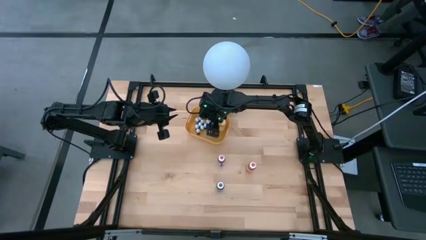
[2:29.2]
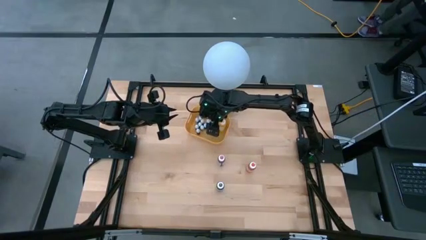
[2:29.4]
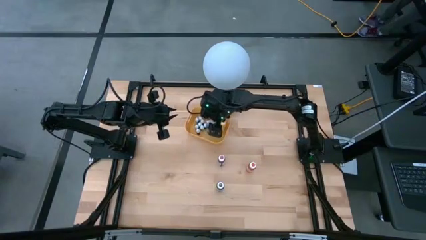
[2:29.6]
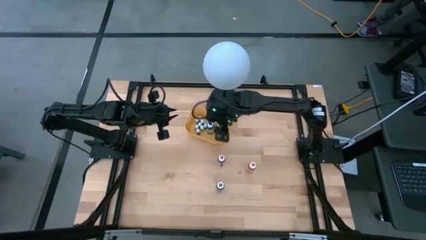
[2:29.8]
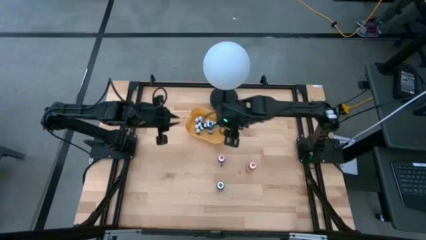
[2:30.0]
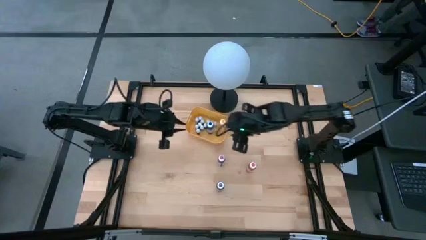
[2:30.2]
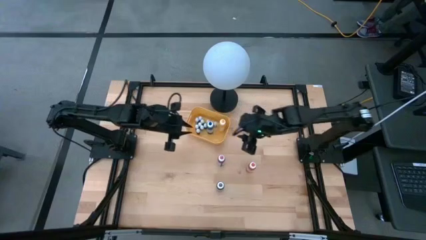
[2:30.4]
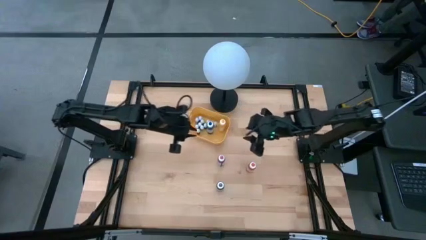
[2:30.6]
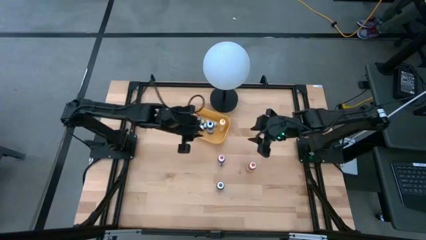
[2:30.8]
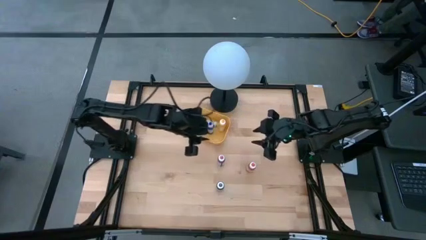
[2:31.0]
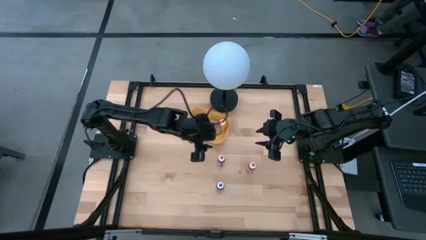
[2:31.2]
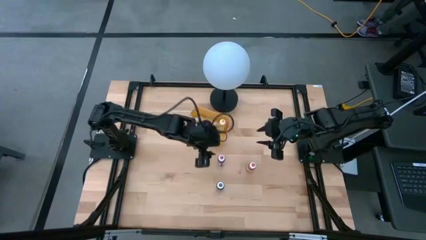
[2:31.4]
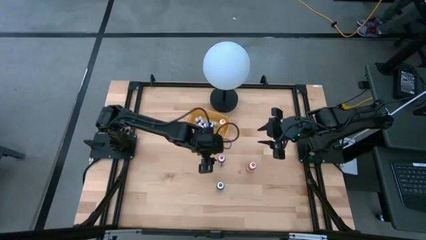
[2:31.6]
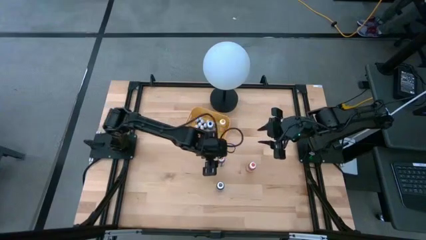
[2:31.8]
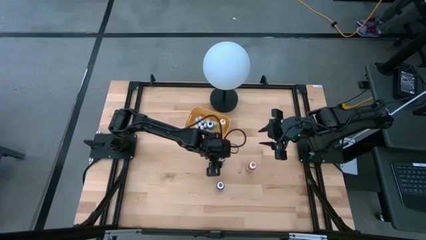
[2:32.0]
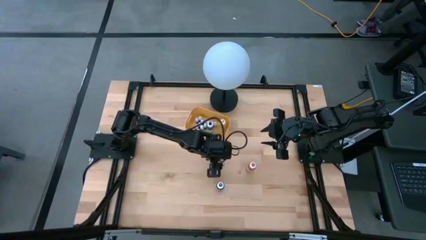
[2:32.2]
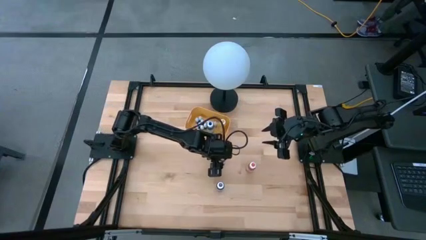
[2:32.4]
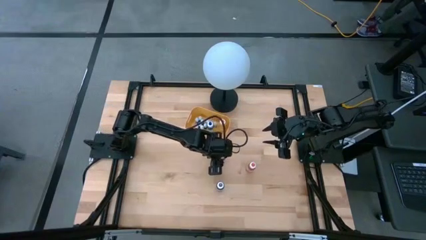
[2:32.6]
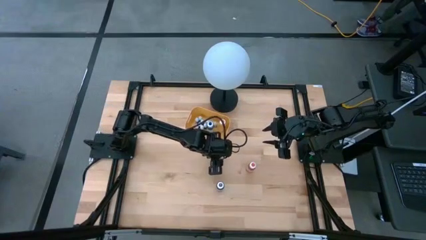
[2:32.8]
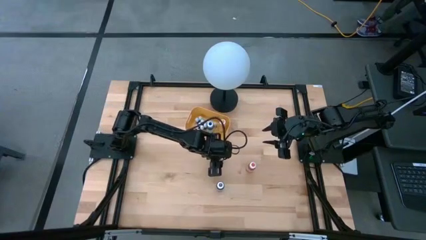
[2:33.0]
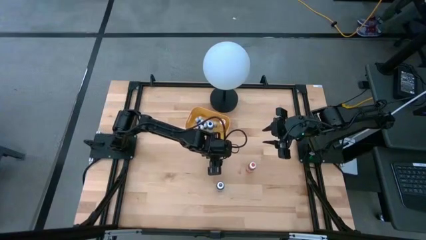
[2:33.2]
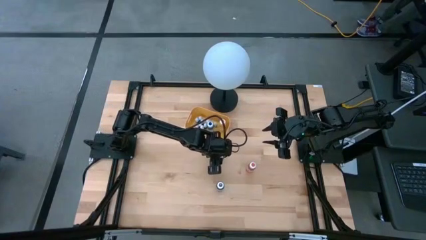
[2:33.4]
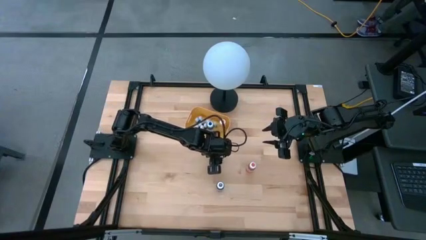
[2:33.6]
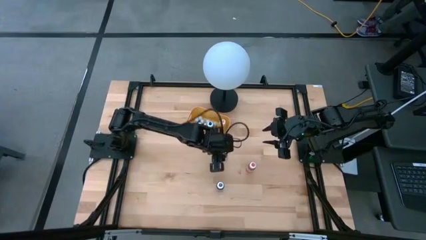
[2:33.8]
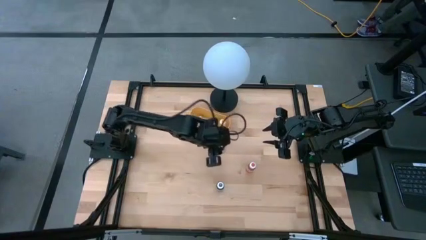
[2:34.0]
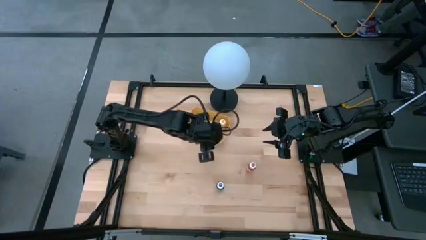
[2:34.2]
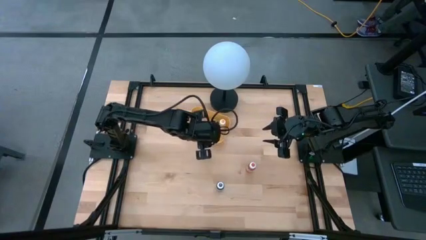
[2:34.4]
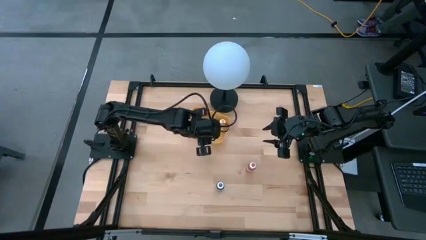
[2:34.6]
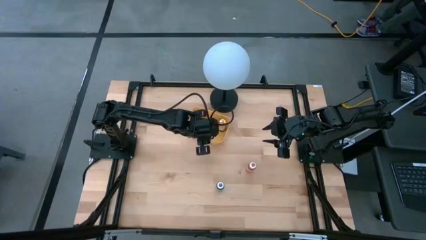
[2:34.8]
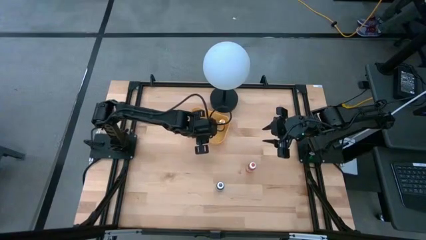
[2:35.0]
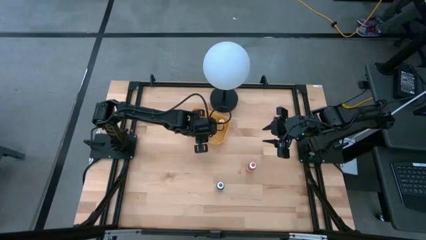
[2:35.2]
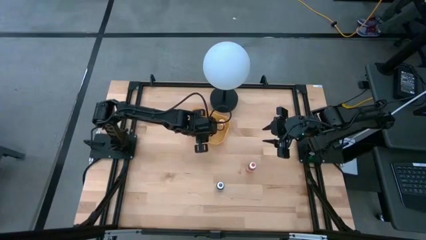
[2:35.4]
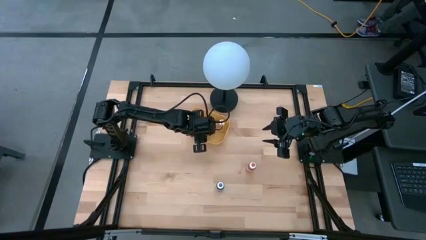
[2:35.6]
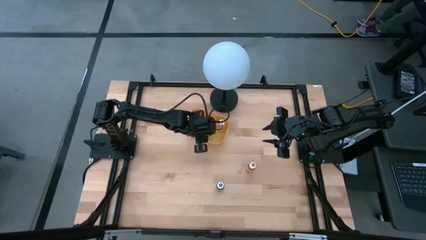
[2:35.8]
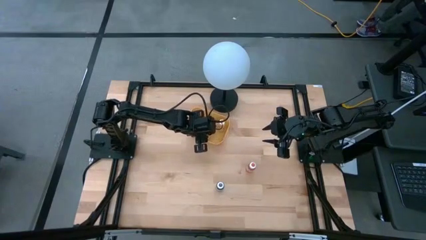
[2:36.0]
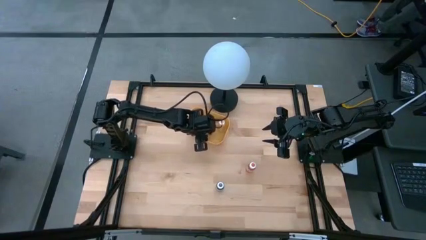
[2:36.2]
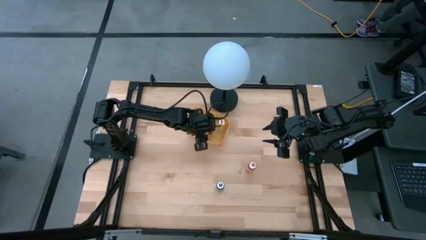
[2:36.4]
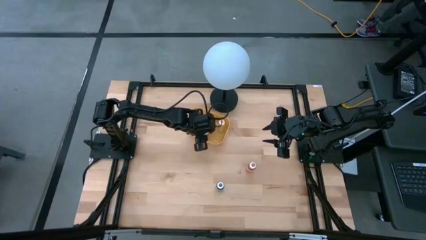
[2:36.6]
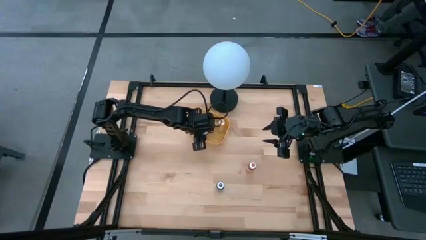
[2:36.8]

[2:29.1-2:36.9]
Task: Pick & Place food coloring
Put the large pink food coloring bottle into the yellow bin

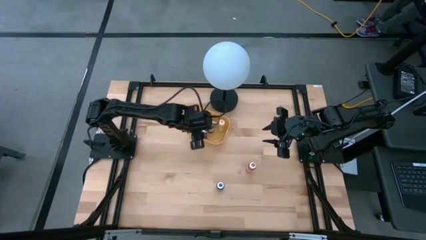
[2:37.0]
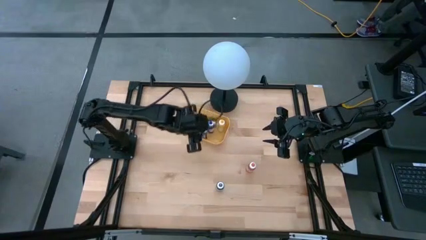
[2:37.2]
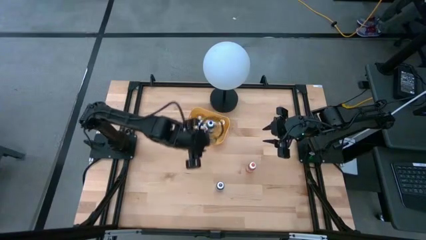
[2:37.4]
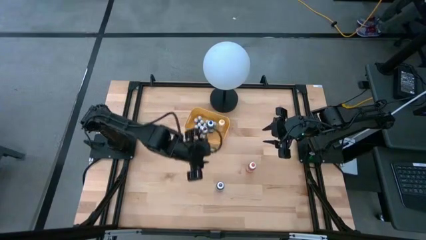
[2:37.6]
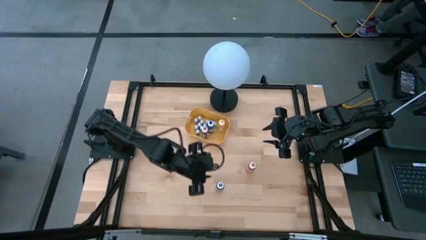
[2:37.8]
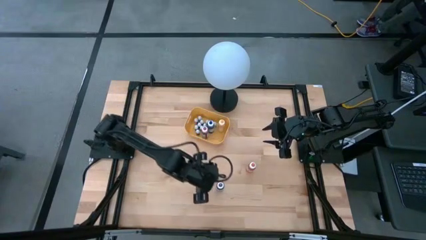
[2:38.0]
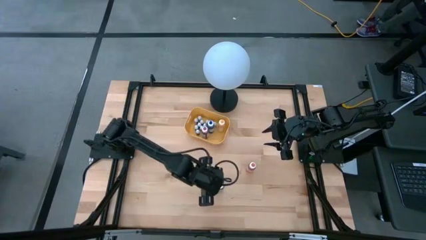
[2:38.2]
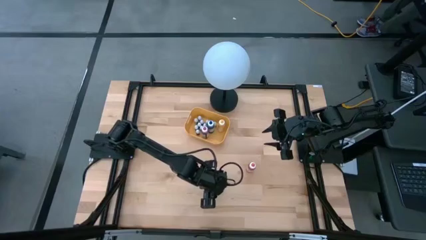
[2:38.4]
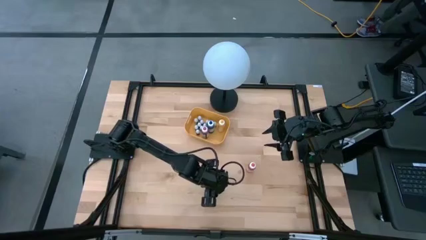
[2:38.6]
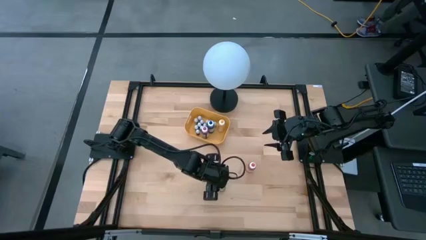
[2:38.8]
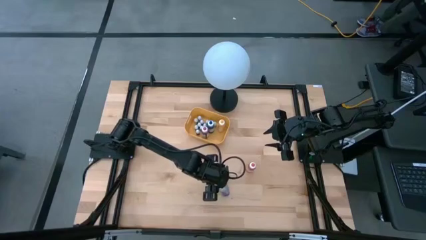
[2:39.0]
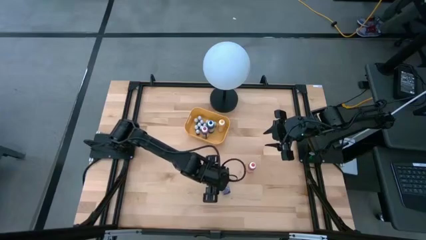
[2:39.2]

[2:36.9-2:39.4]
Put the large purple food coloring bottle into the yellow bin

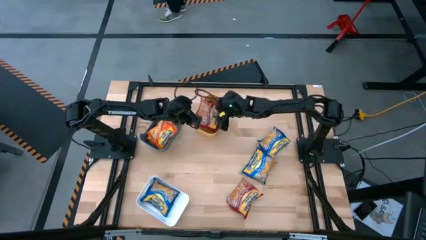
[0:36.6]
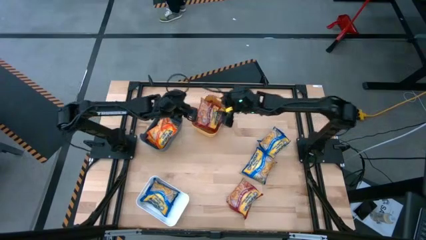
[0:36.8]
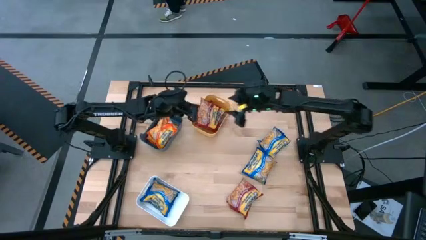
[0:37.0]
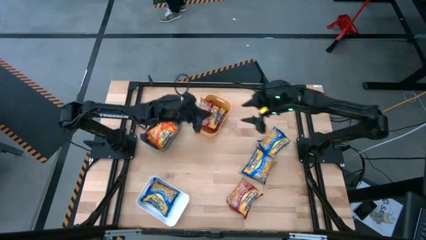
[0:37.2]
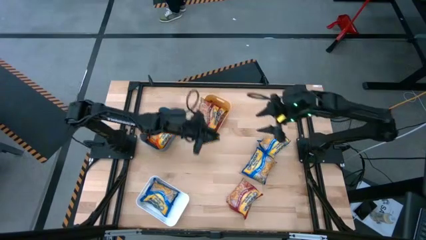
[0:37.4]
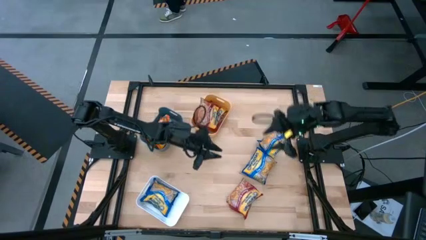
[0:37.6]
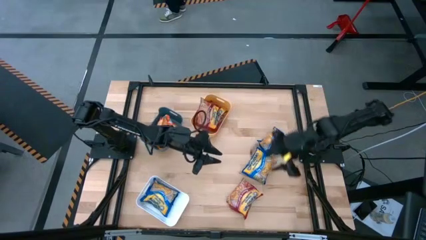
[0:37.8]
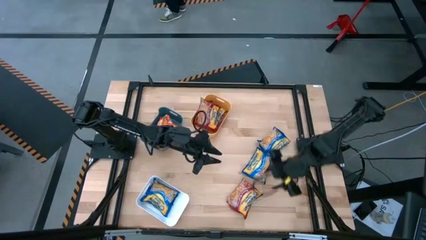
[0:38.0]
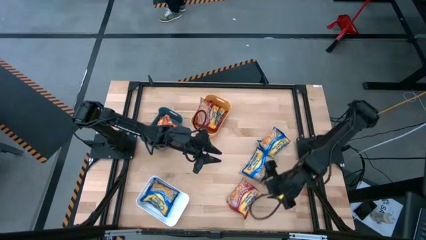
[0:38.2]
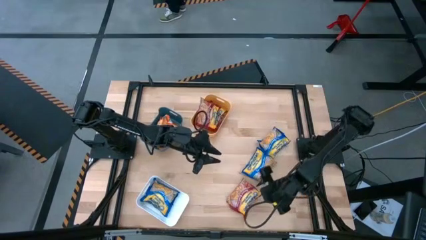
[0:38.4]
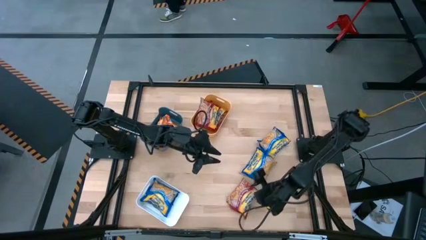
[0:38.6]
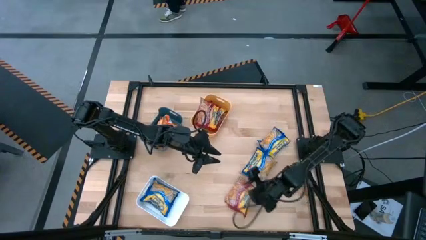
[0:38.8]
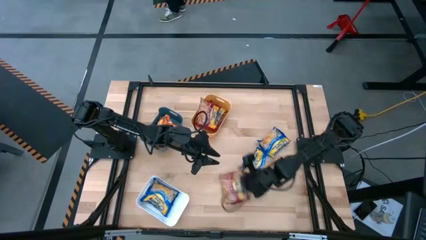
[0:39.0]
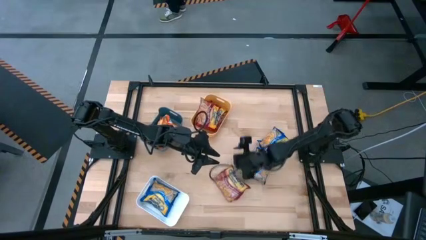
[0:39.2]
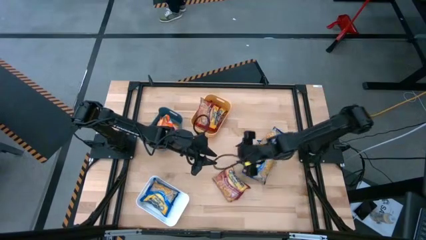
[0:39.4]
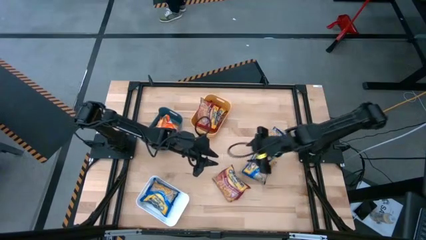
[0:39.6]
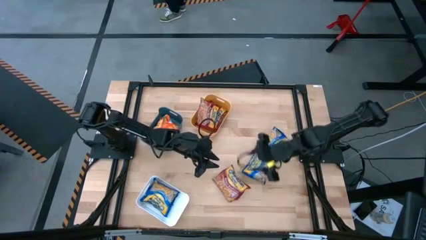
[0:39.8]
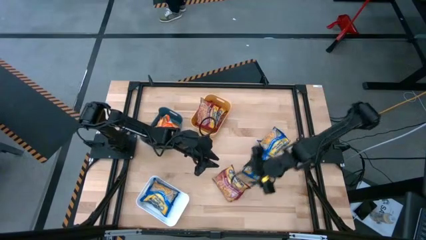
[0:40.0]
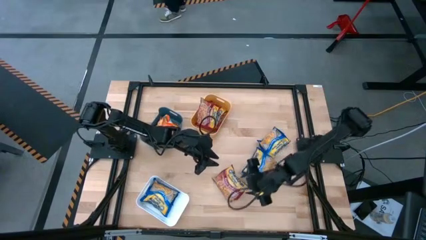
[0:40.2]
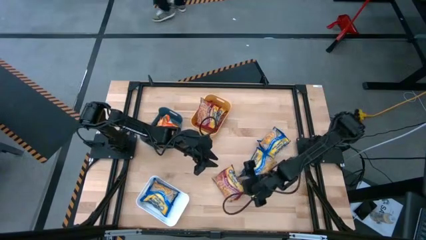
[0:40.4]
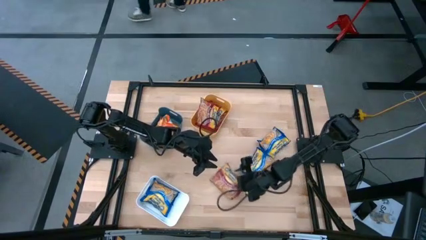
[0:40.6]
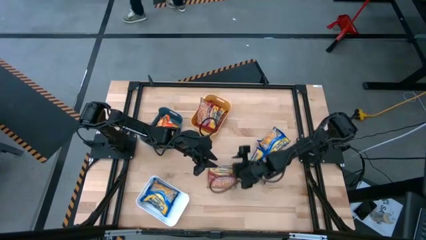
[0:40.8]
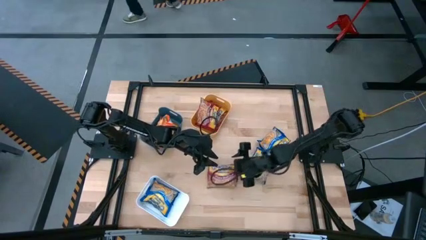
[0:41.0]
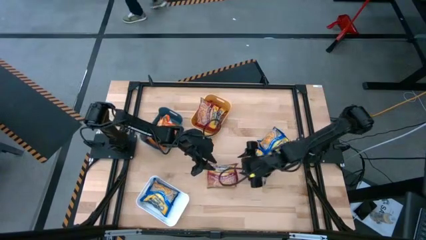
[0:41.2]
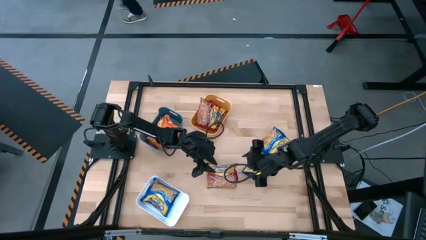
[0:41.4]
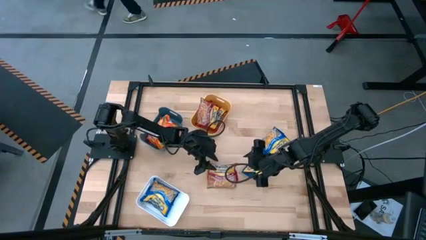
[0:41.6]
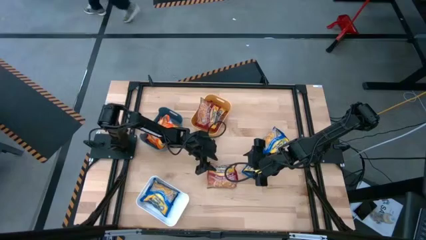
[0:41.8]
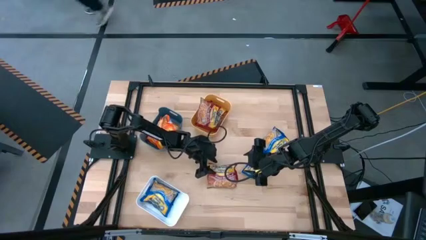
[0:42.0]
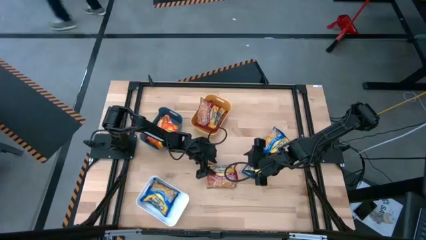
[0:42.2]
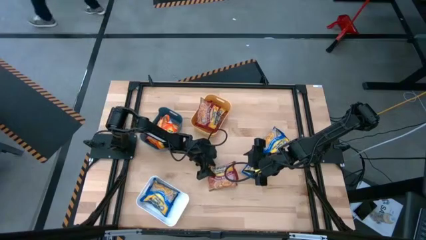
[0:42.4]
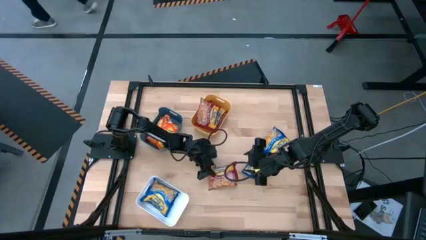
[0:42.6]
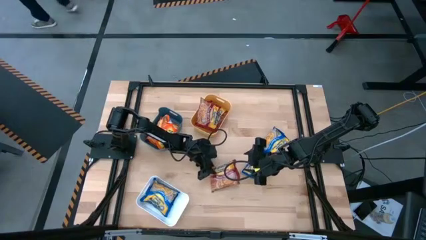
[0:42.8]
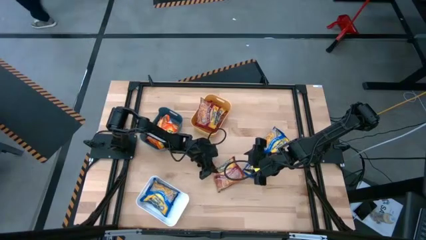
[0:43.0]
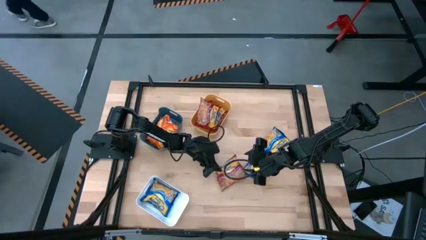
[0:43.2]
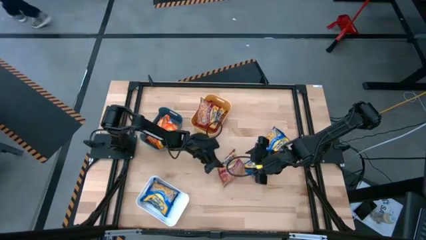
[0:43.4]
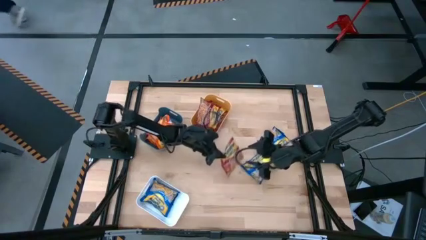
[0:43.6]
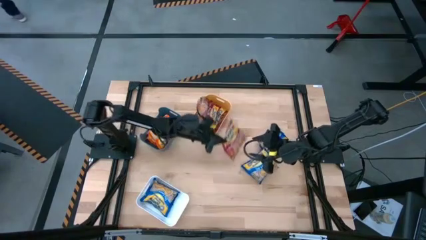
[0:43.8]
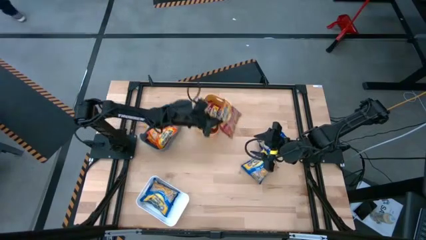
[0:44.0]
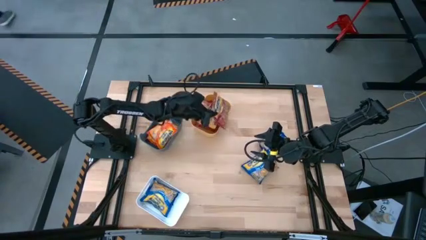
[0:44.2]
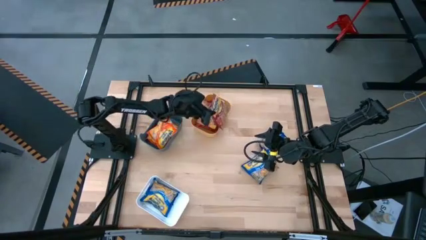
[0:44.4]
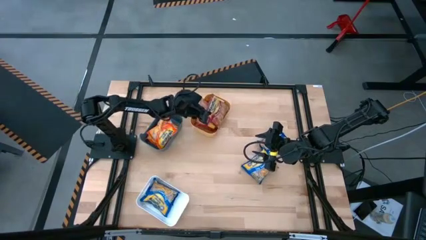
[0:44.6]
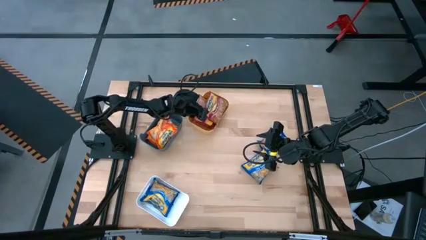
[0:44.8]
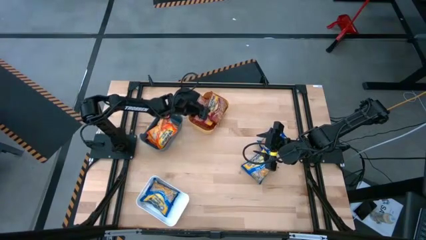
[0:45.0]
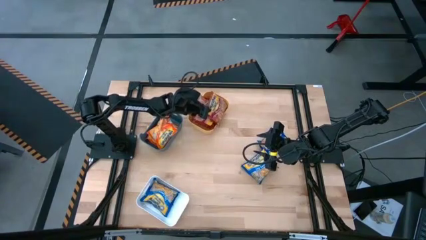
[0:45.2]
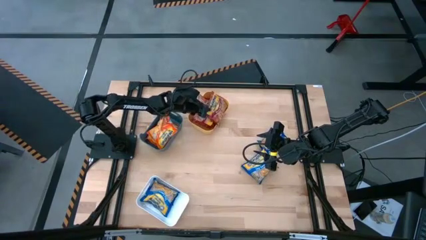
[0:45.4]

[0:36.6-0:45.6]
Task: Sort Maruchan noodles
Put the red noodle pack into the yellow bin
